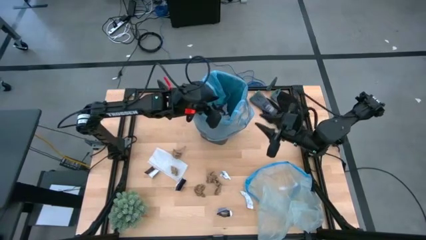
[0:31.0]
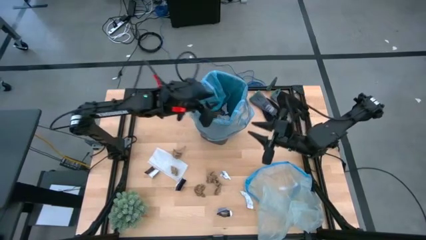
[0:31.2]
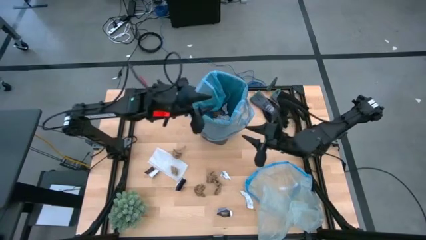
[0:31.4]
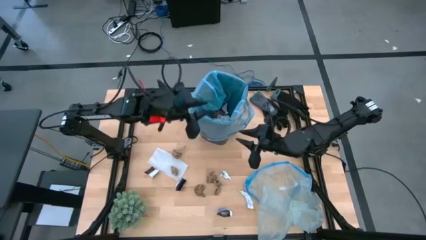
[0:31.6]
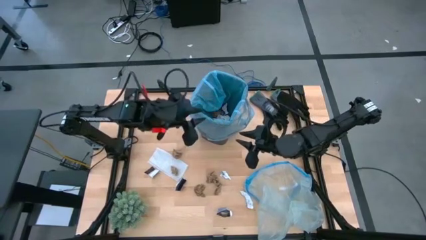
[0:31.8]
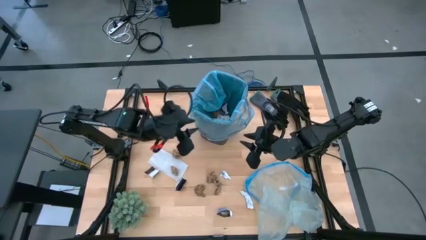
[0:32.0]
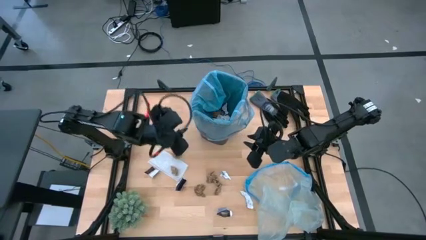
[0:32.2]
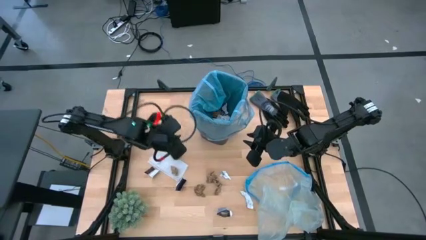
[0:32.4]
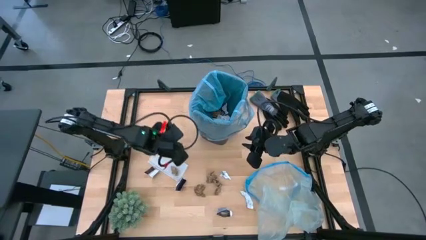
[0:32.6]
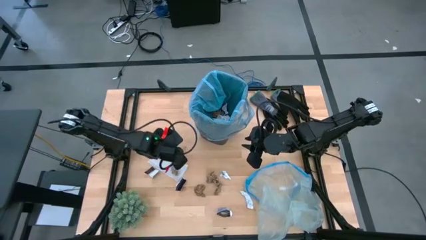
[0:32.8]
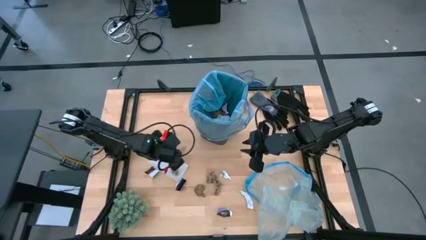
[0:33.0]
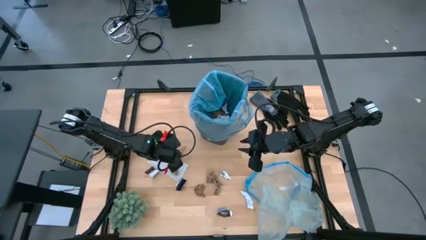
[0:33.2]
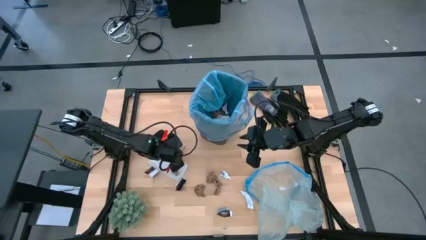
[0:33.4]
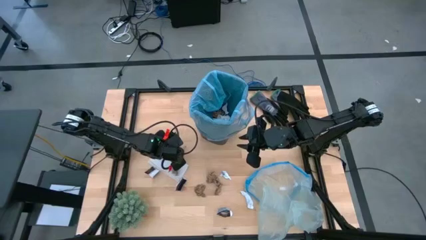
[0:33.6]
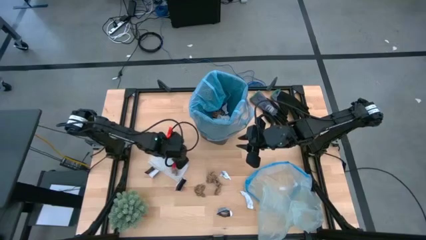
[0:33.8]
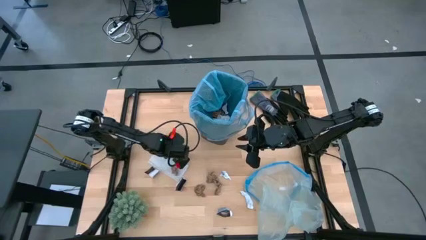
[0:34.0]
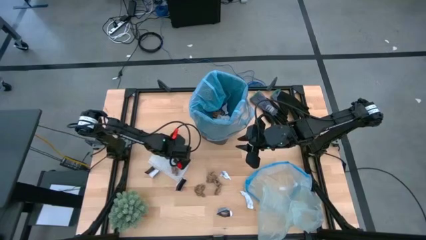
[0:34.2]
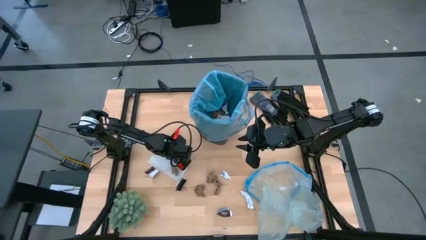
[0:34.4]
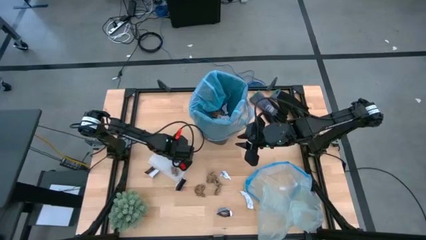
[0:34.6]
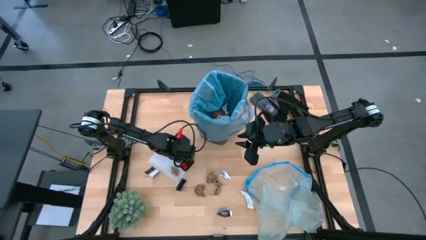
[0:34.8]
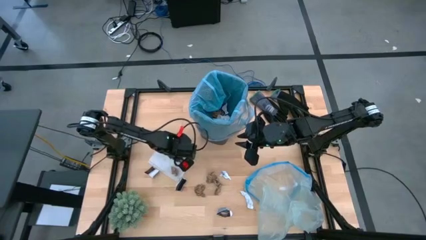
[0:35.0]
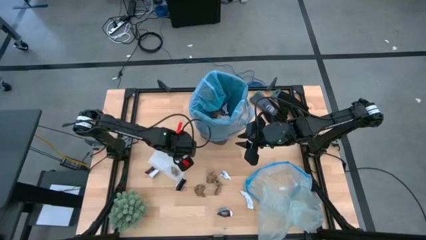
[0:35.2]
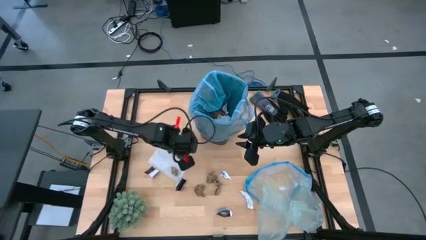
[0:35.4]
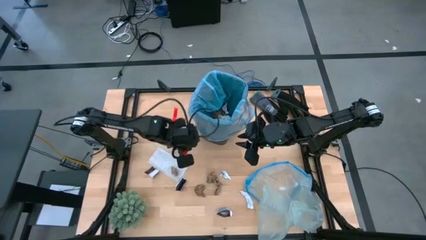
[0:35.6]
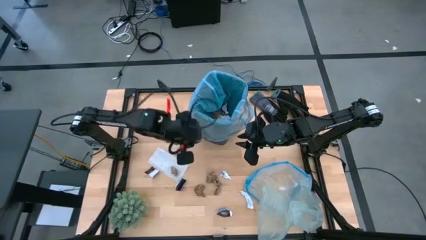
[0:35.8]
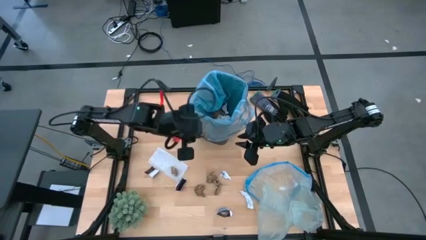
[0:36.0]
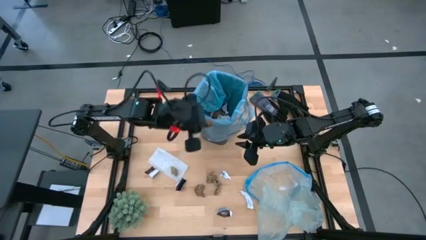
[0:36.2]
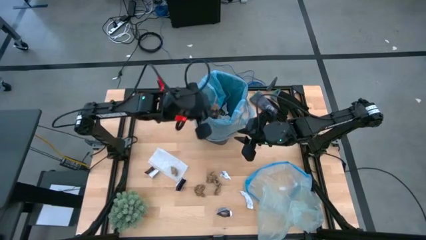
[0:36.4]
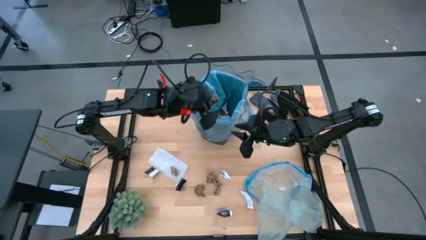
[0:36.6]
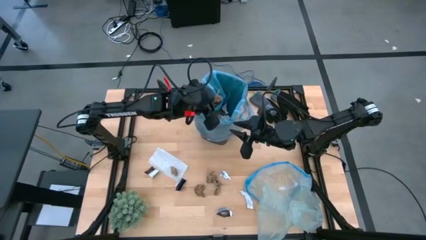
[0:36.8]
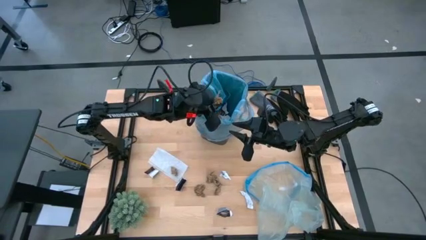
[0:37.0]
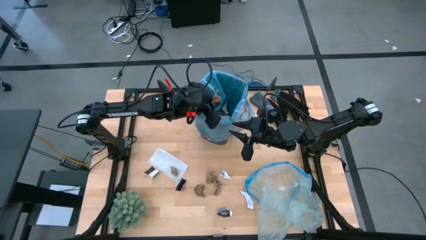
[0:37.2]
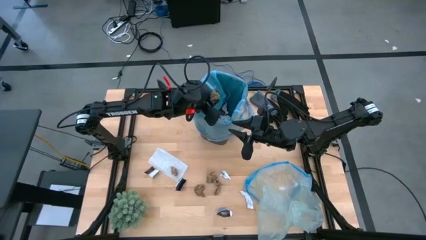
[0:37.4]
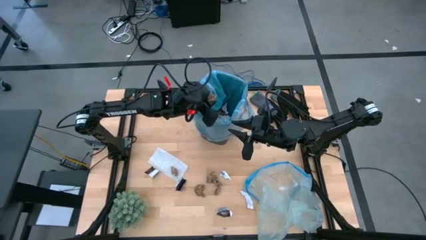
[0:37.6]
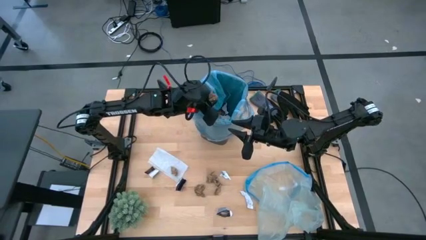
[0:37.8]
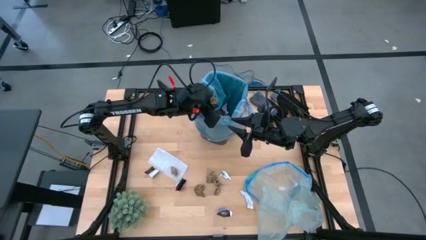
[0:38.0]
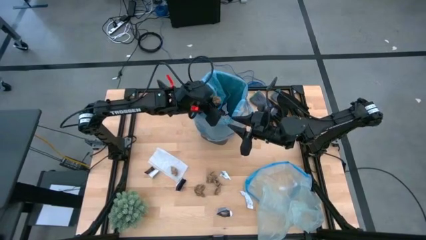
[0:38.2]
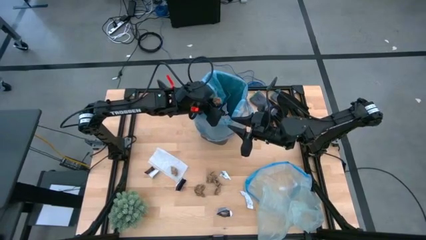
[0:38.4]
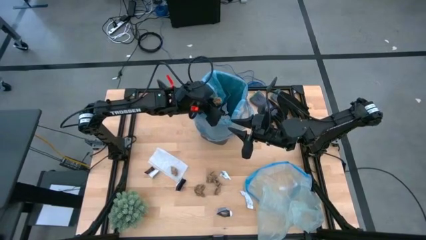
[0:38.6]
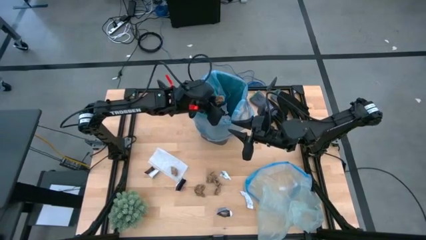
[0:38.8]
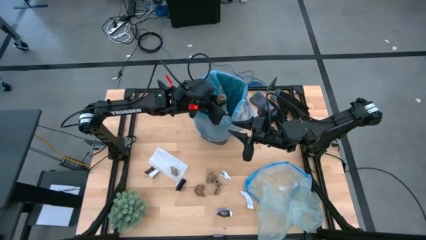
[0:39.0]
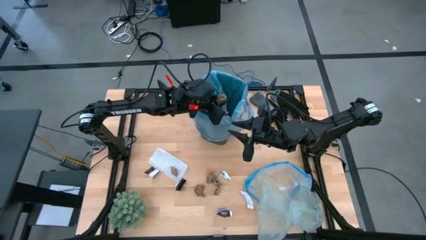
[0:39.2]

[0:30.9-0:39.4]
Task: place trash/remove bag and relplace
Put the brown napkin into the trash bin

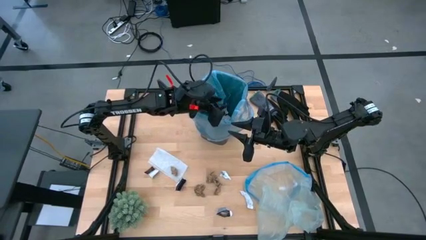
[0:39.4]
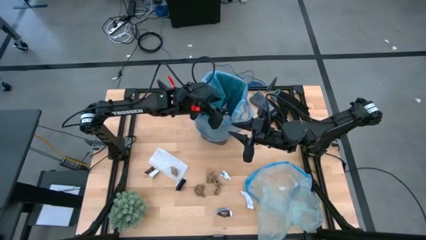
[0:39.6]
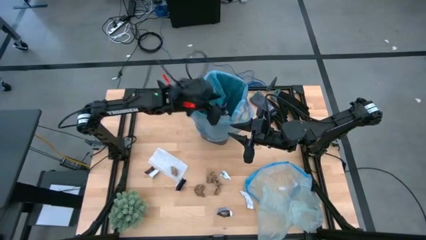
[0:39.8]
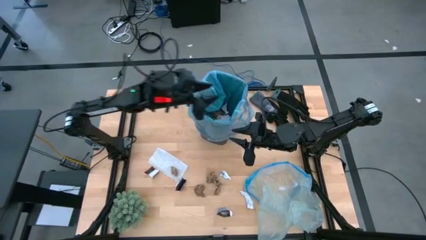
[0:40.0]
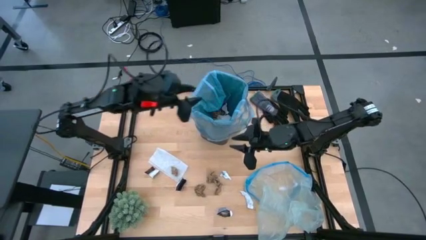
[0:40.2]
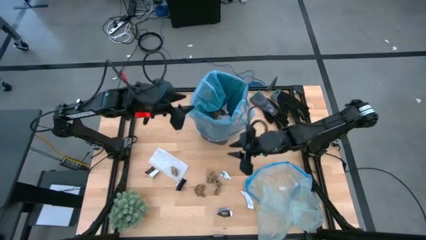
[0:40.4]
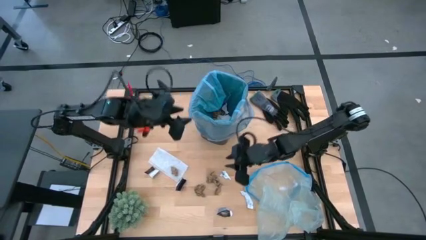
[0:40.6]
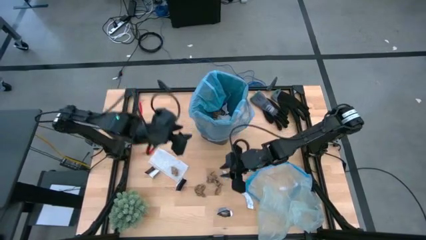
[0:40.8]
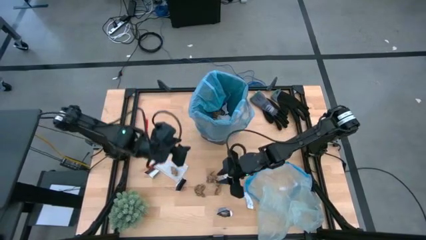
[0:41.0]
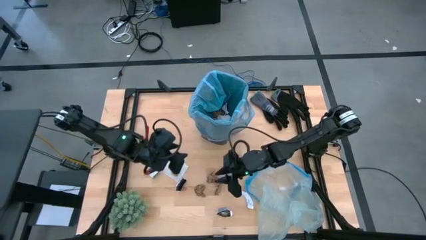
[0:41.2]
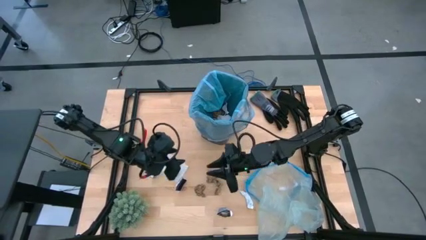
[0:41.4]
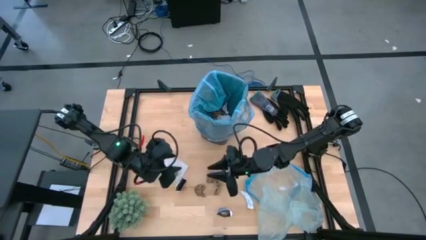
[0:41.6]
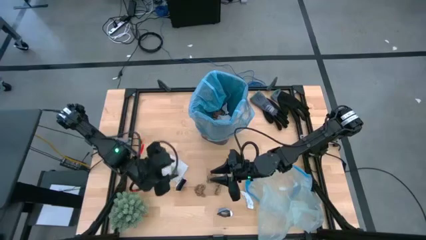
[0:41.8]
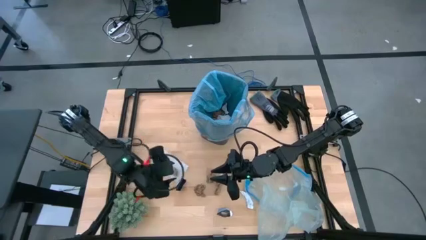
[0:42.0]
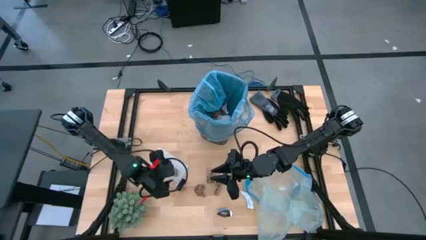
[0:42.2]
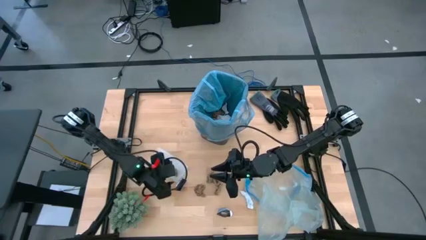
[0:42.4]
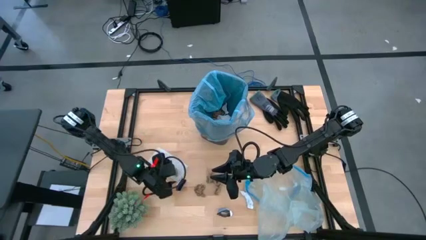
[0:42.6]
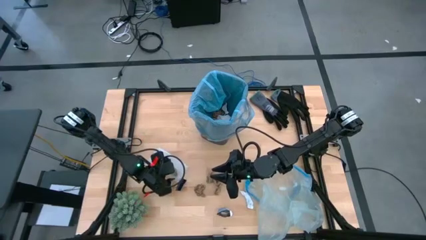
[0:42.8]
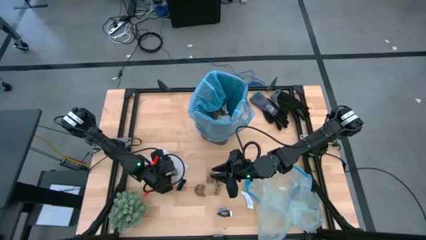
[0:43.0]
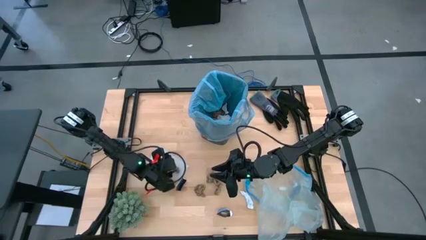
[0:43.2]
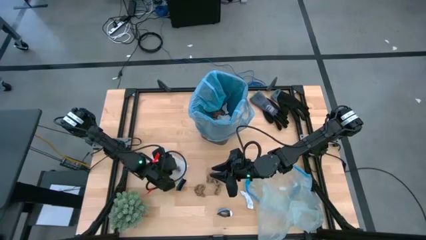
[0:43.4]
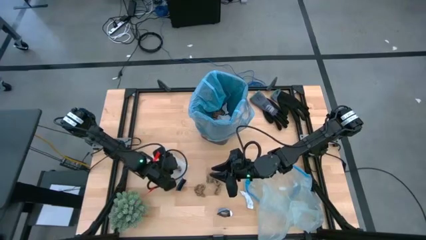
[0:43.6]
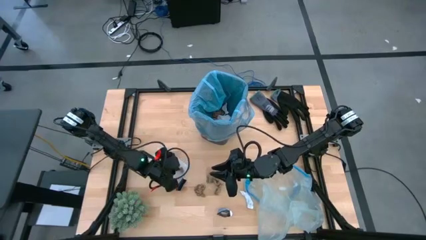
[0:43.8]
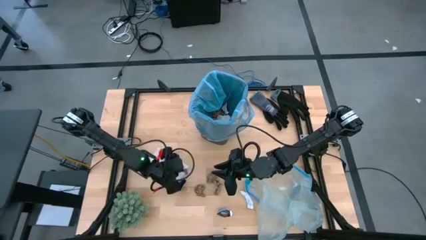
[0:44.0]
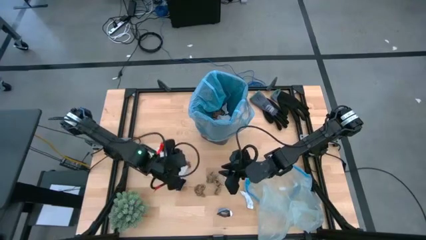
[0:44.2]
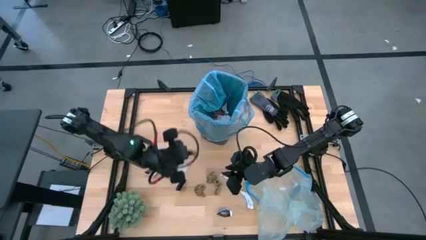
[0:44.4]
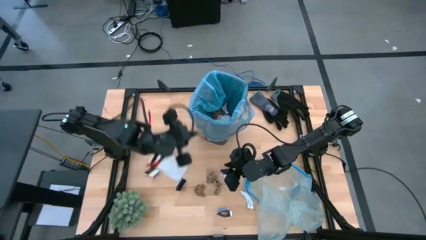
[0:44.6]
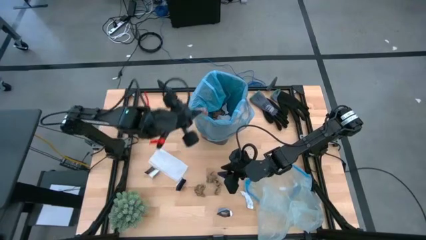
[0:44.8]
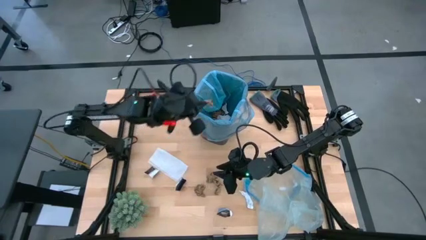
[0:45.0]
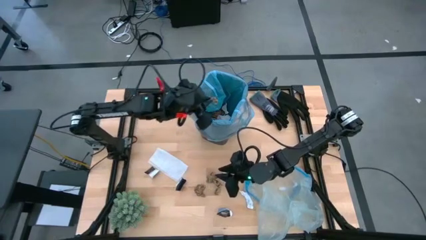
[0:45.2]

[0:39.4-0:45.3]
Put the brown napkin into the trash bin

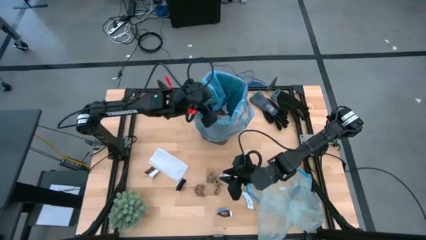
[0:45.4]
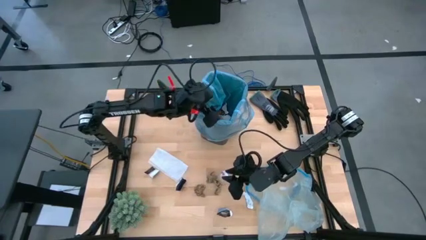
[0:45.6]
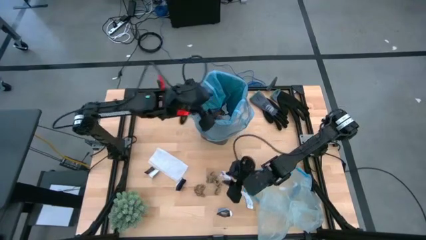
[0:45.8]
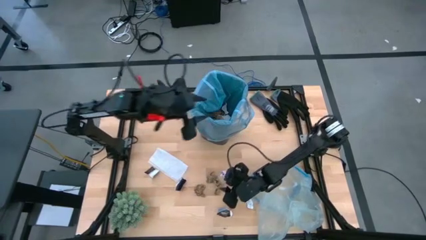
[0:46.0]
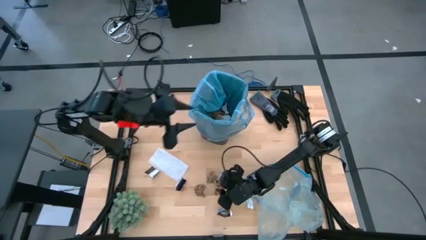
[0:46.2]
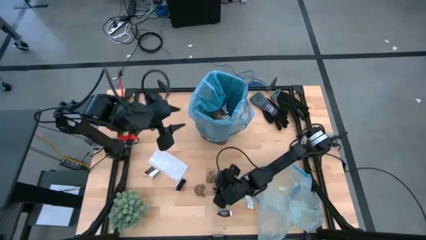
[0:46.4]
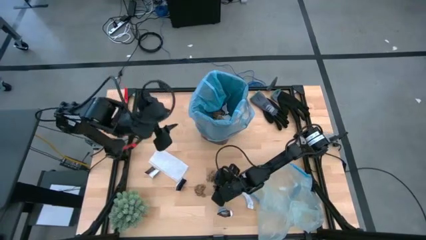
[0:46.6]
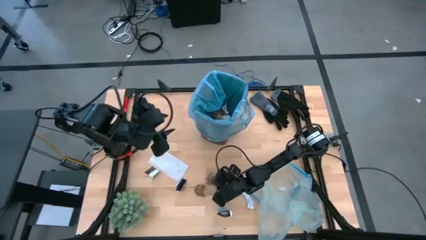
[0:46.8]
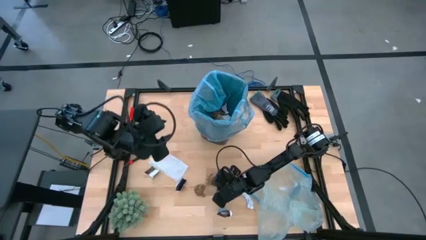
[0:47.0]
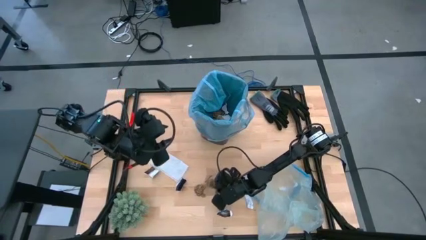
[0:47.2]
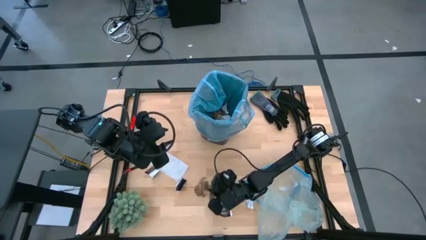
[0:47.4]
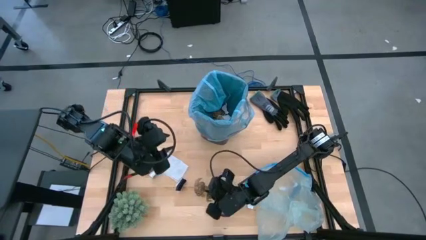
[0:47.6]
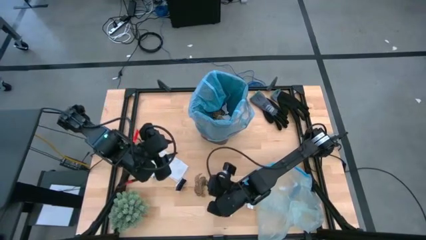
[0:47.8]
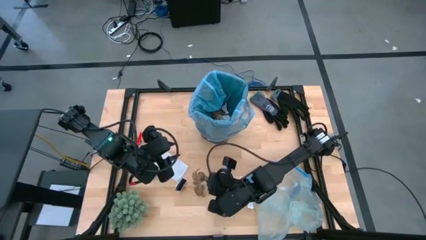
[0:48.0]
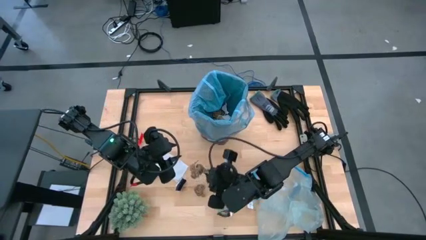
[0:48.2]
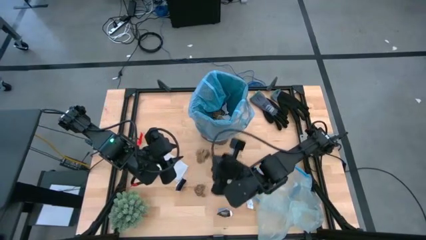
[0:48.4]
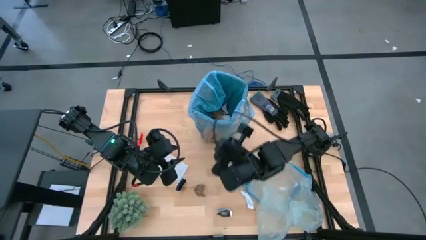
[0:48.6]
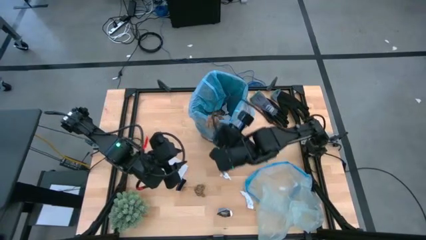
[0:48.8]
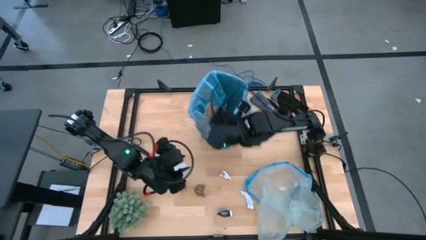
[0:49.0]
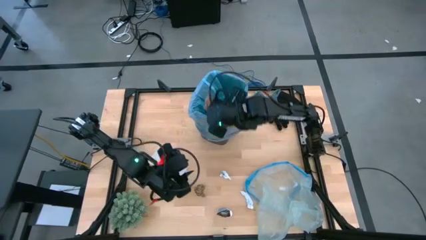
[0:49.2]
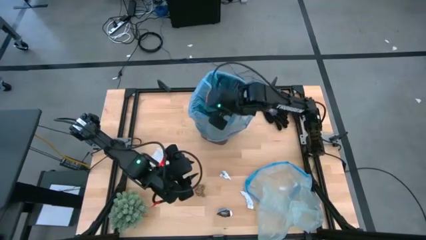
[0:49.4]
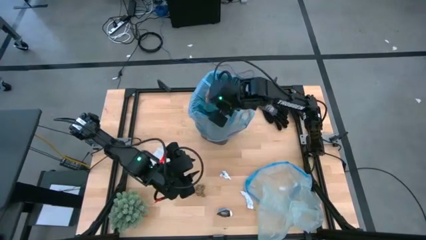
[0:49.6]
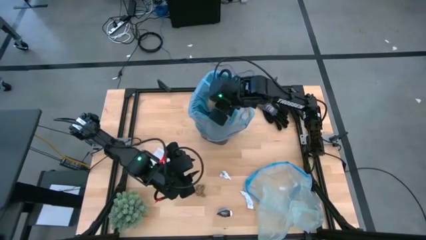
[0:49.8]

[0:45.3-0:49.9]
Put the brown napkin into the trash bin
